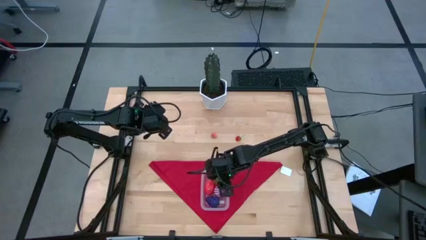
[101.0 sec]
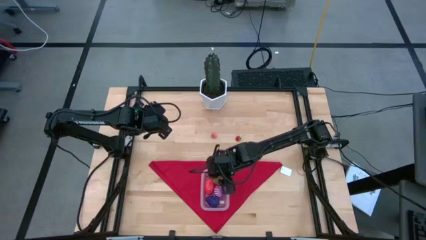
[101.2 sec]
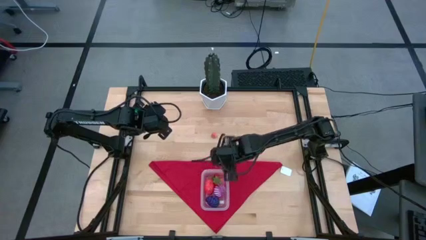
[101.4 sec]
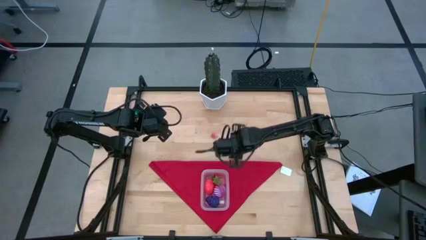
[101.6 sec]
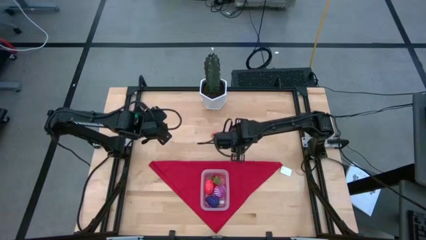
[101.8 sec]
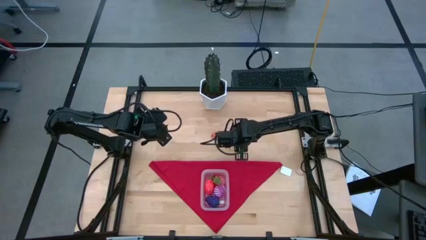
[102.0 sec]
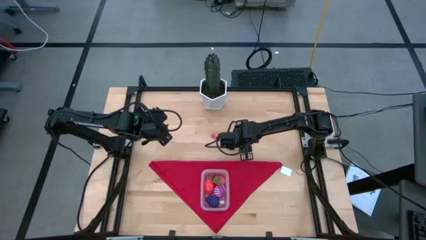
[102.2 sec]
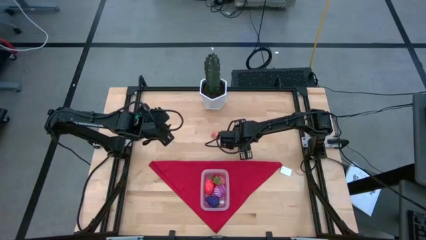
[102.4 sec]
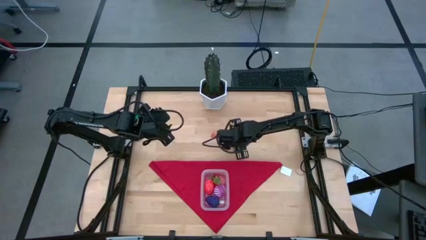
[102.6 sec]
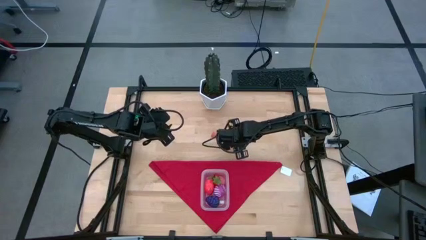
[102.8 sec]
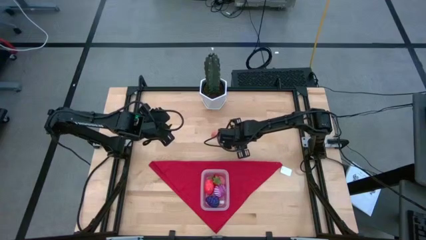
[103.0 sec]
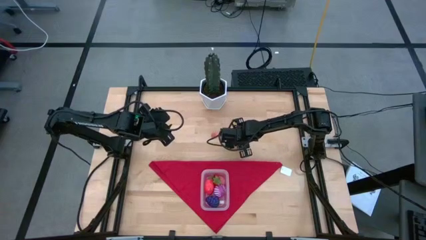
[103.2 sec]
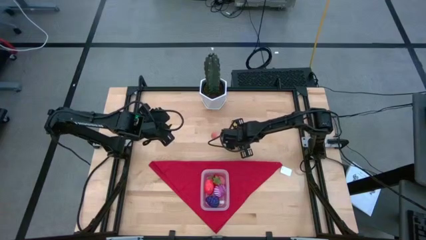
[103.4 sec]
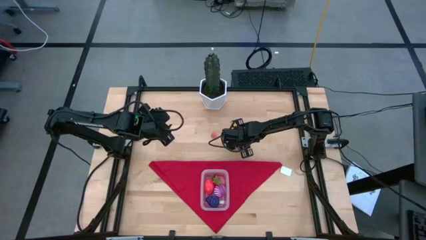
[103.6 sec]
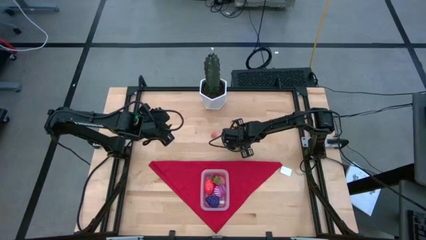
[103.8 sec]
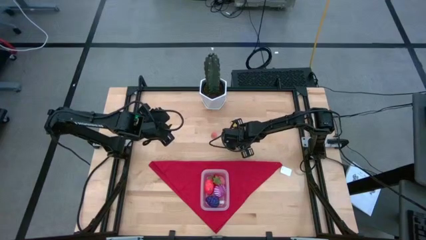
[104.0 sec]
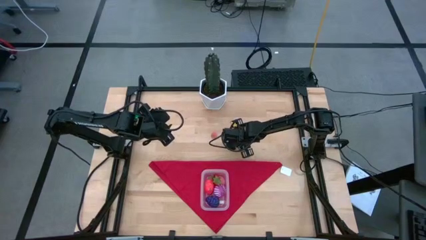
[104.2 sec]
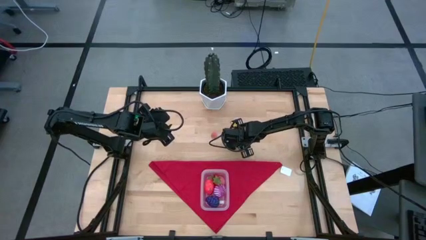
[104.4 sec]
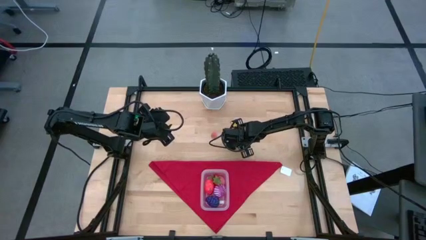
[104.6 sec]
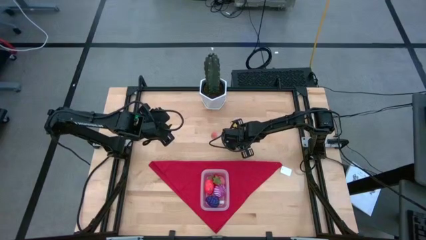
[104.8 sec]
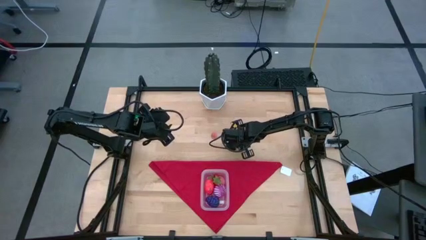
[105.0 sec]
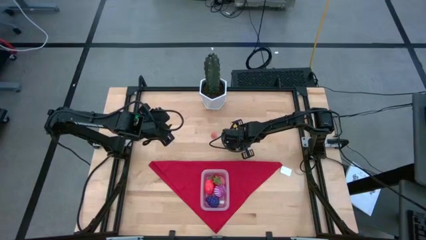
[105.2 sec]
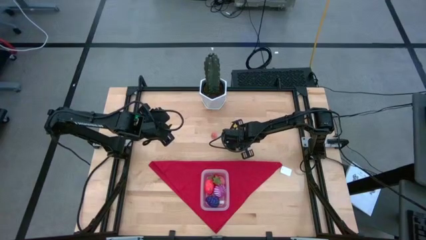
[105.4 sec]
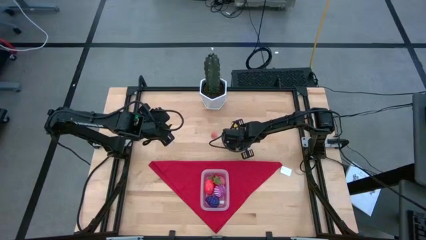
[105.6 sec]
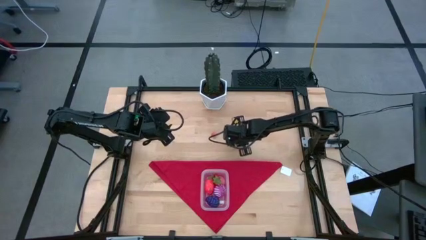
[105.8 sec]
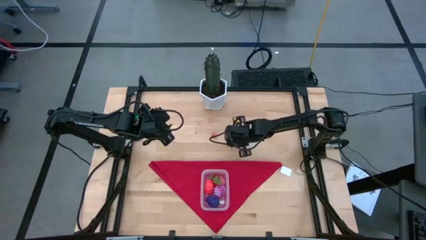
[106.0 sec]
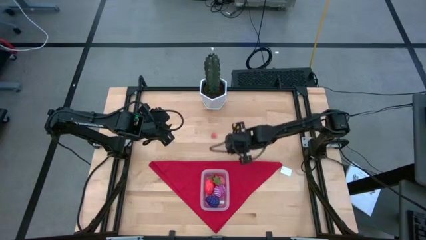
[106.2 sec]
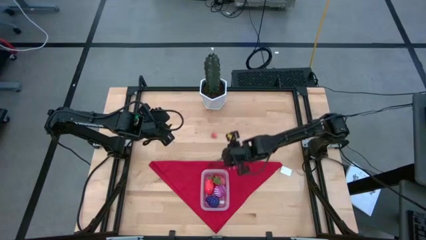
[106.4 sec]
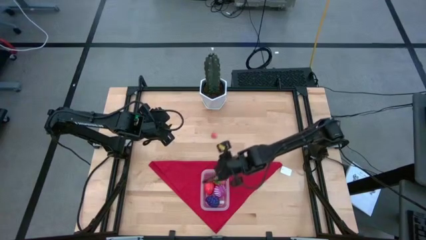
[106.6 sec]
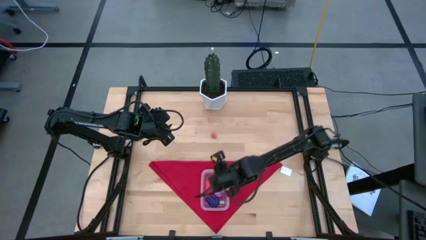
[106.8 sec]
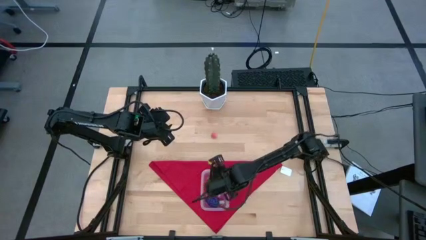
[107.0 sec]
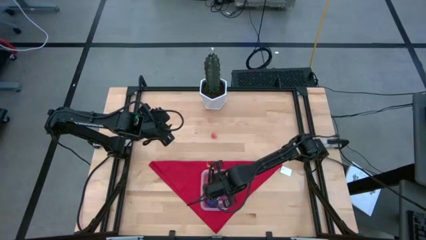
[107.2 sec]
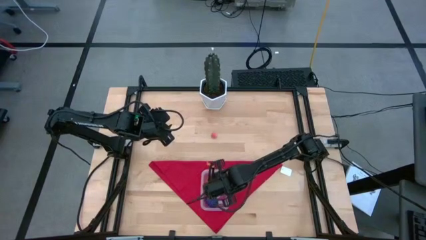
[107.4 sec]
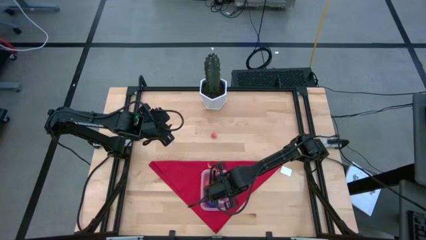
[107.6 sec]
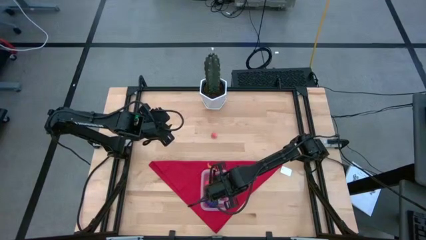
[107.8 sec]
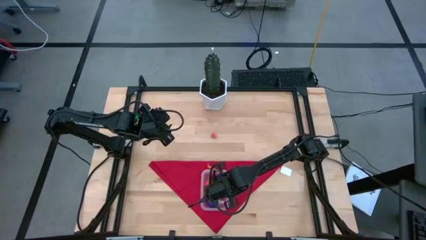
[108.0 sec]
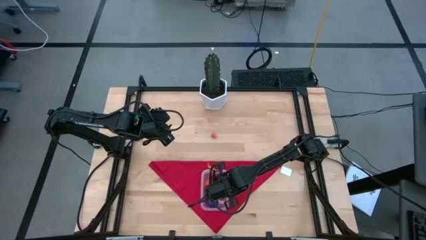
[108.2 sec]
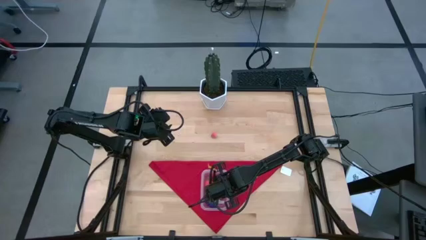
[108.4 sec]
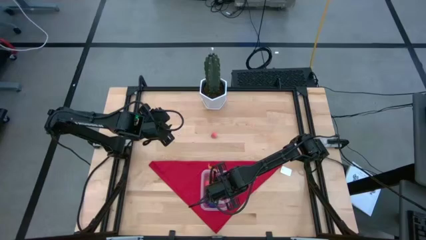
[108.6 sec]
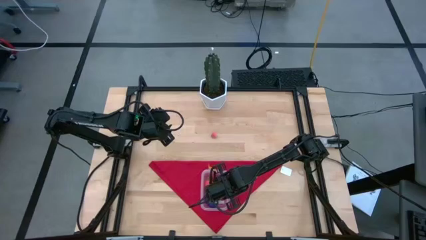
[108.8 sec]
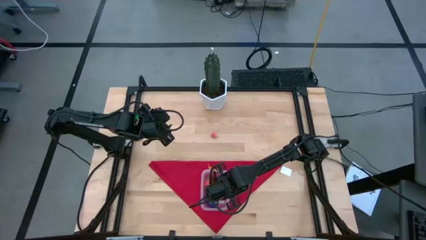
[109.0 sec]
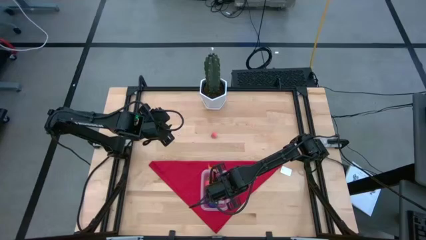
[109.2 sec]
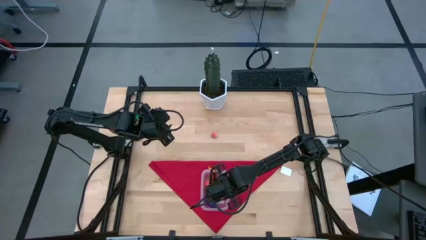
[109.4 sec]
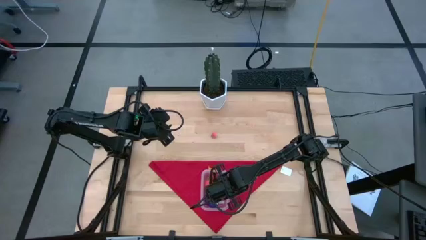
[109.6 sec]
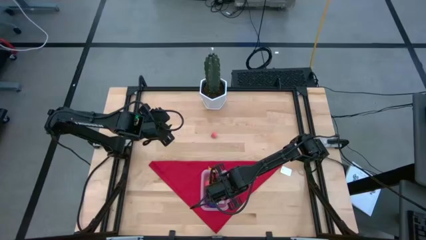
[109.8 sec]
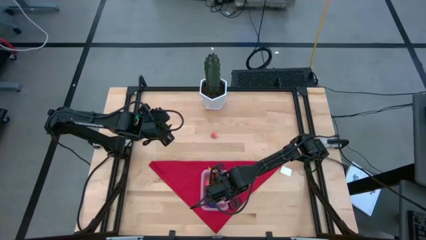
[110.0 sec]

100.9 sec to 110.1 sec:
Task: Pick and placing Produce into tupperware
Put the strawberry into the transparent bin

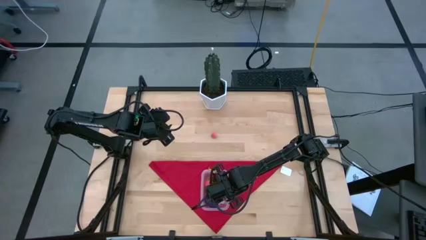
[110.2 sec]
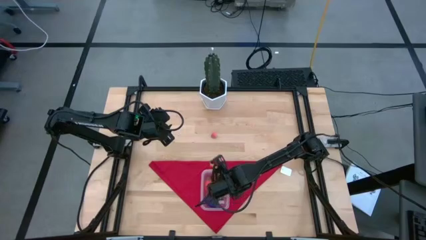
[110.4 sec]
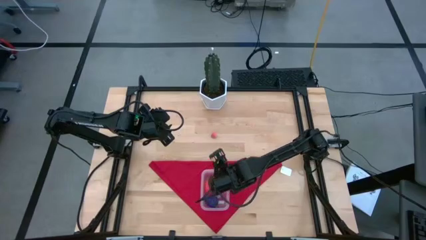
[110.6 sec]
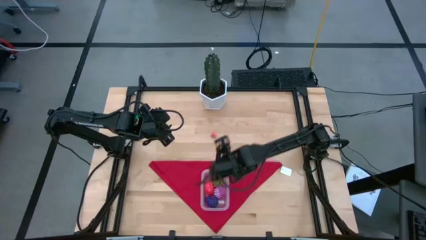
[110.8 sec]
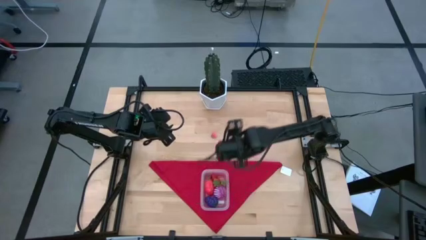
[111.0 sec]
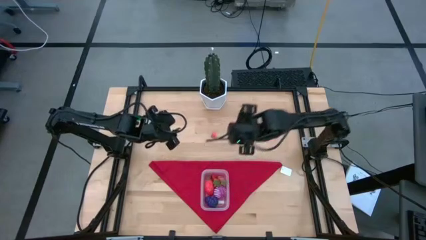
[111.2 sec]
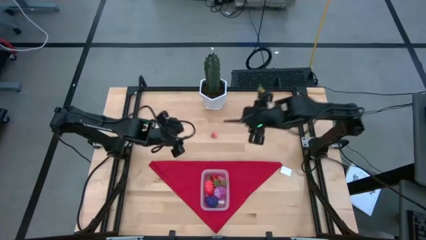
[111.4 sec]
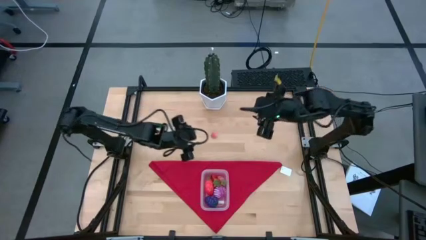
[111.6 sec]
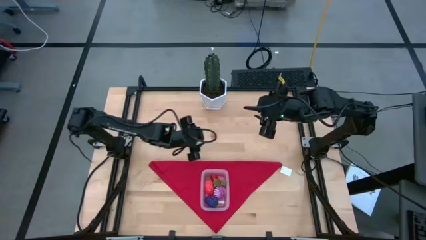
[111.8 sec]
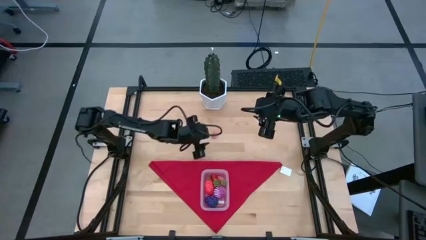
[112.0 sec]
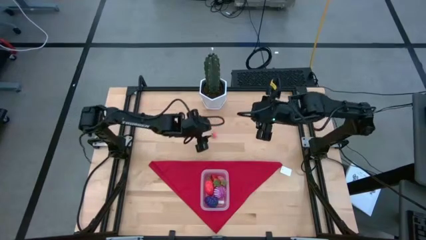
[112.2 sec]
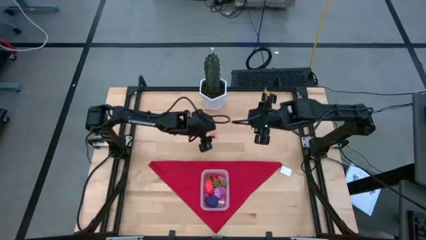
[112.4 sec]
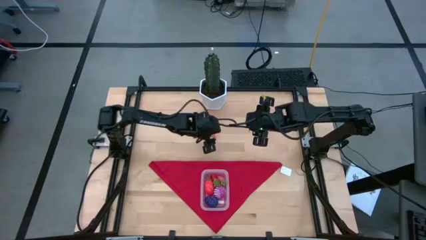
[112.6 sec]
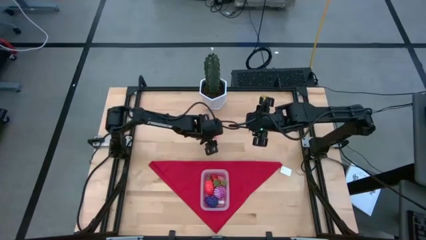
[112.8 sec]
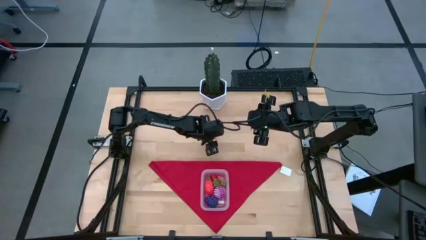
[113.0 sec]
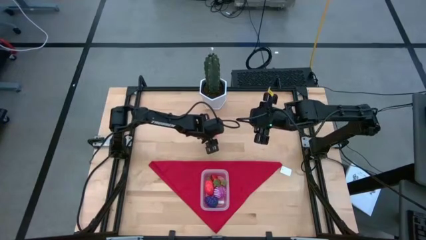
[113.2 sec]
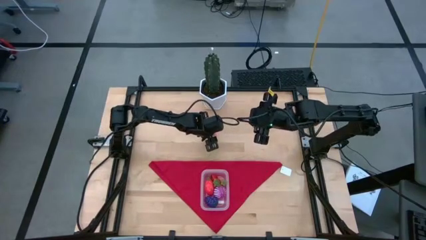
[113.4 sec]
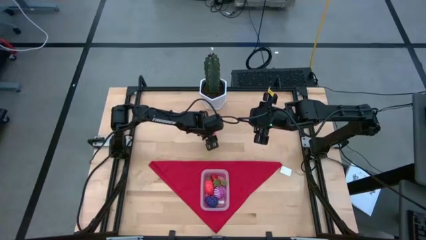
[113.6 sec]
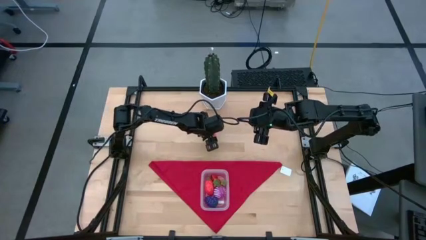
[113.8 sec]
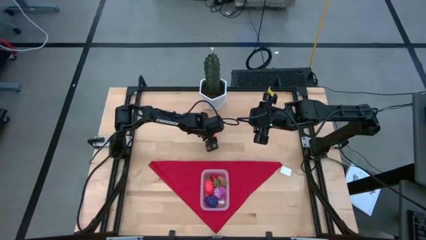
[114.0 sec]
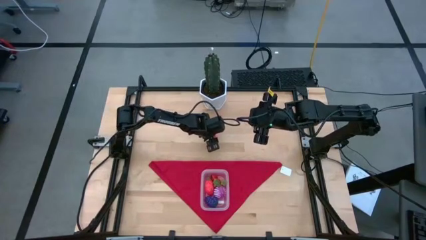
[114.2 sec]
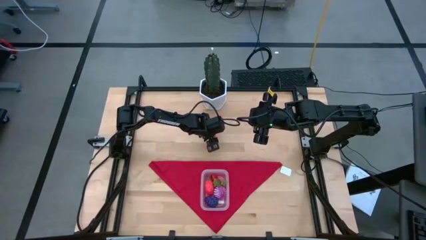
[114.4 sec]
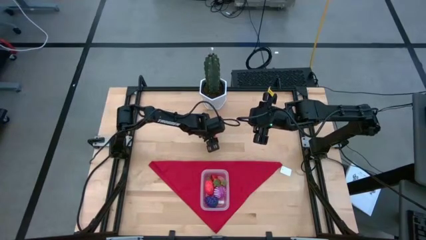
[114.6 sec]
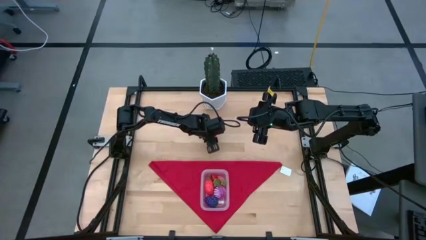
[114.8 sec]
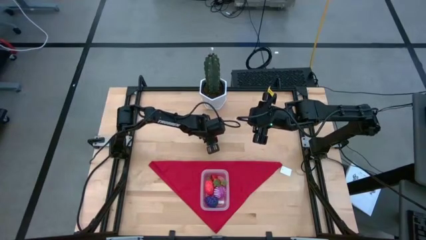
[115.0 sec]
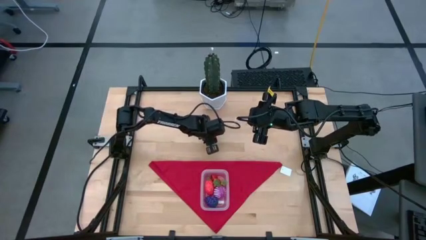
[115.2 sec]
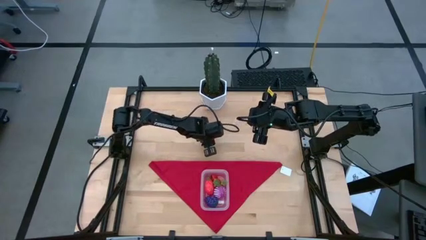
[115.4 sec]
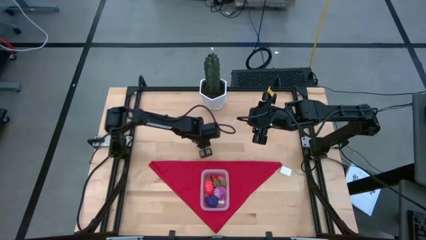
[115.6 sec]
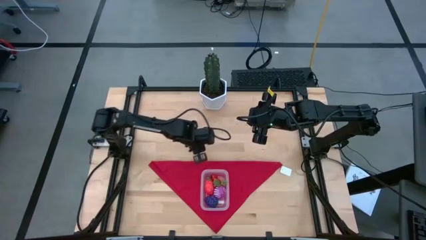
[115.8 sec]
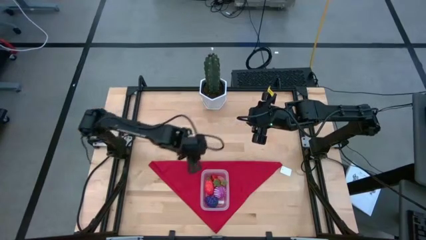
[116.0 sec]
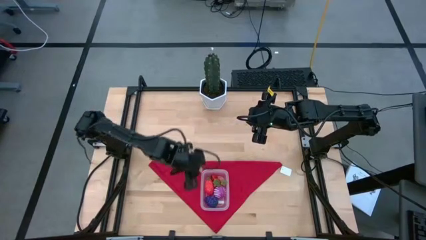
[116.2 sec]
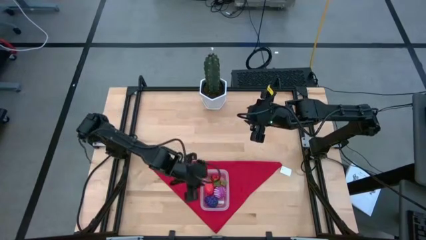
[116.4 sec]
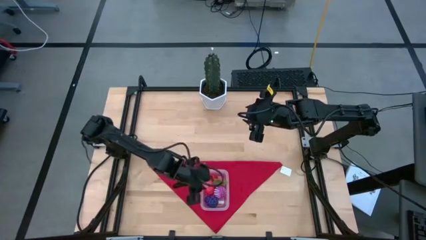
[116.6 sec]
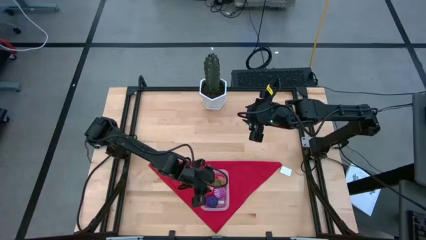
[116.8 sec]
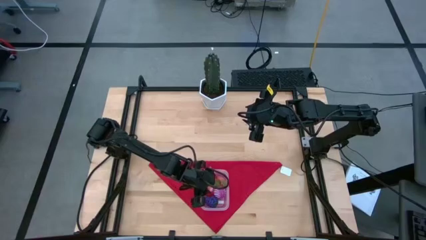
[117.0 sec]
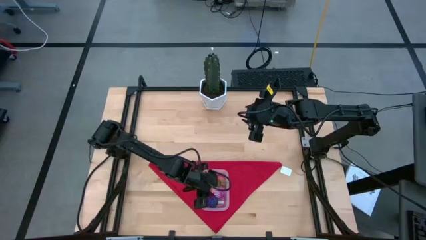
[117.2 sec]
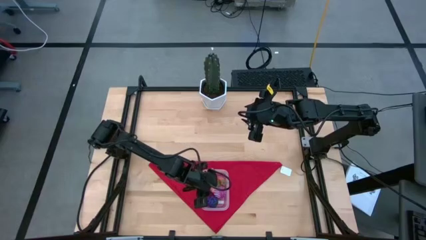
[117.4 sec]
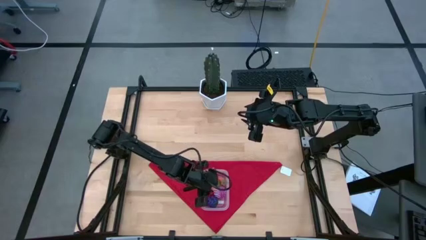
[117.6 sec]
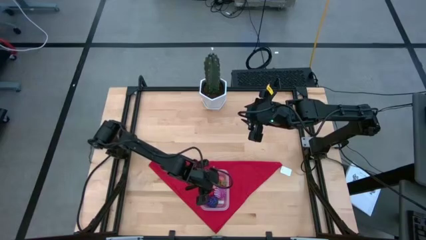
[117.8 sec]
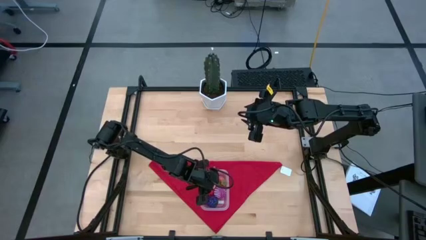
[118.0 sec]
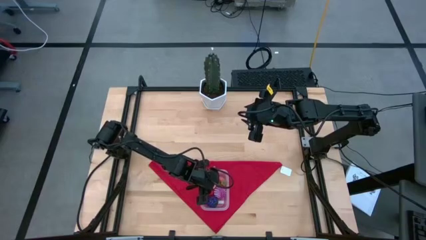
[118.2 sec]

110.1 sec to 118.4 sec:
Put the apricot into the transparent bin
